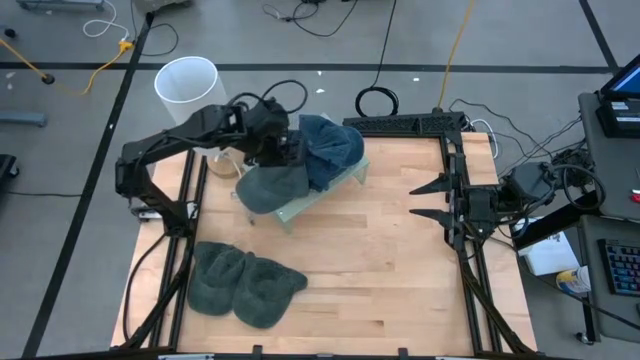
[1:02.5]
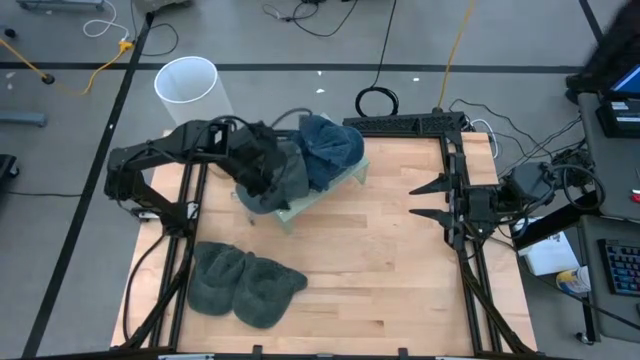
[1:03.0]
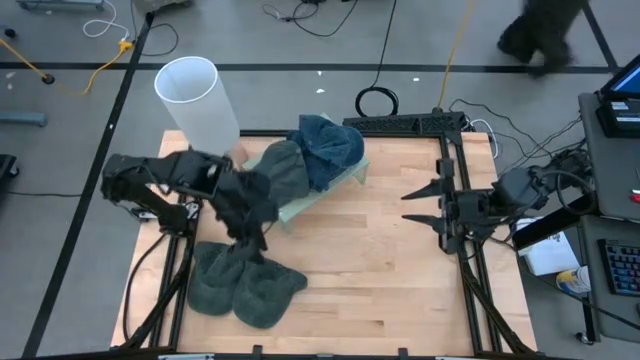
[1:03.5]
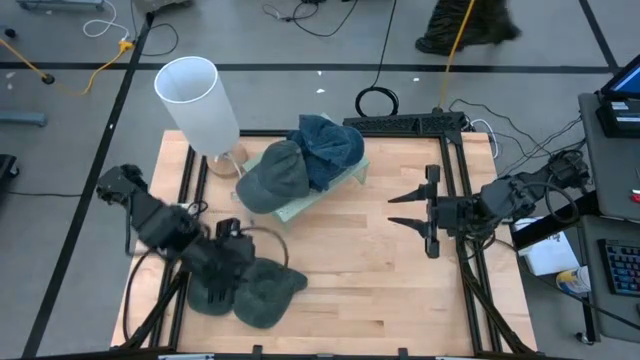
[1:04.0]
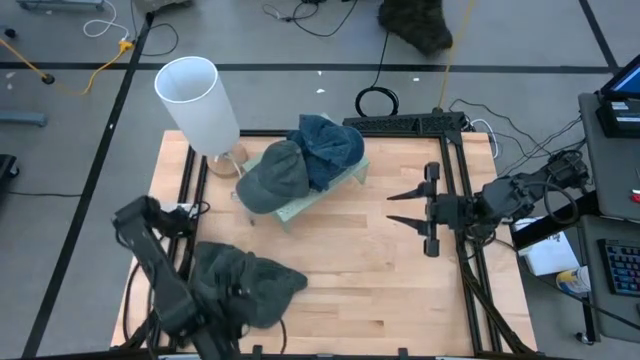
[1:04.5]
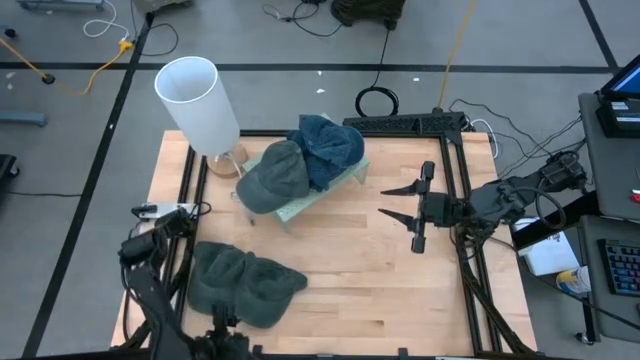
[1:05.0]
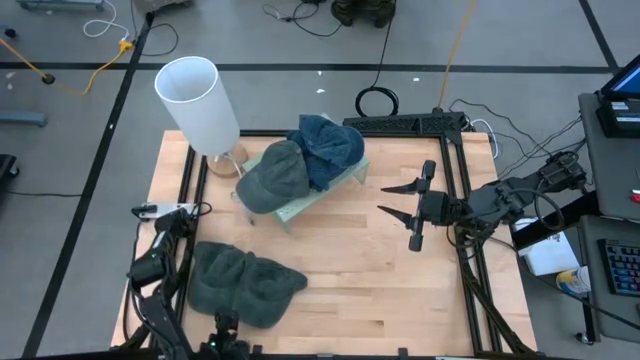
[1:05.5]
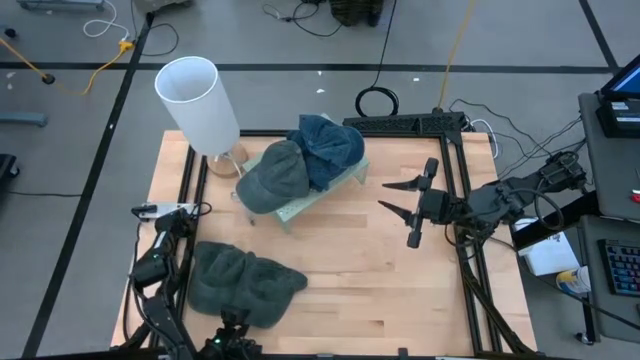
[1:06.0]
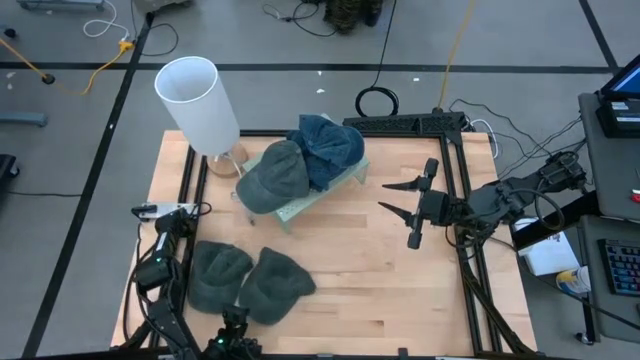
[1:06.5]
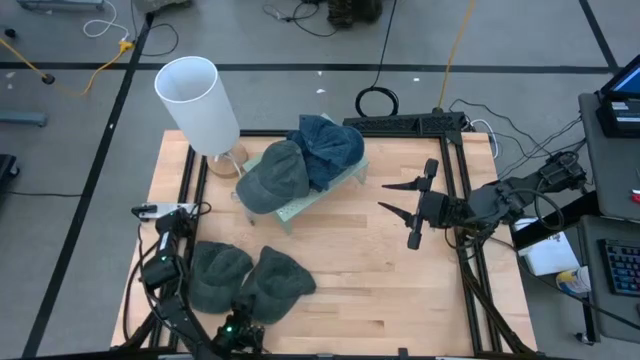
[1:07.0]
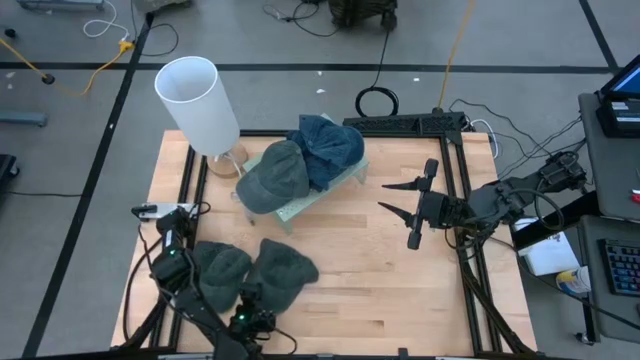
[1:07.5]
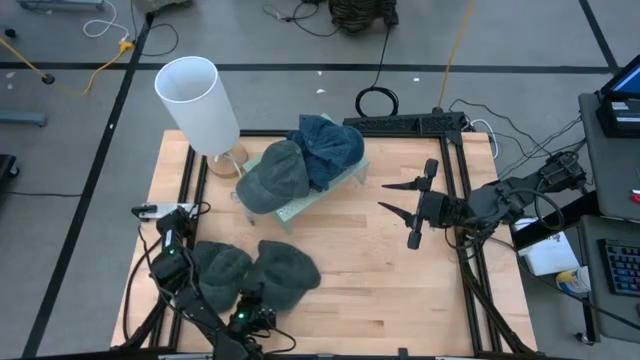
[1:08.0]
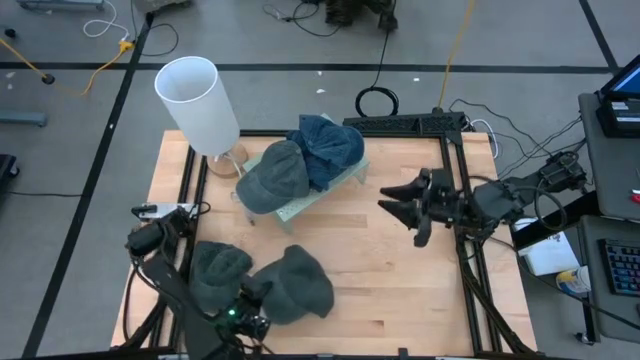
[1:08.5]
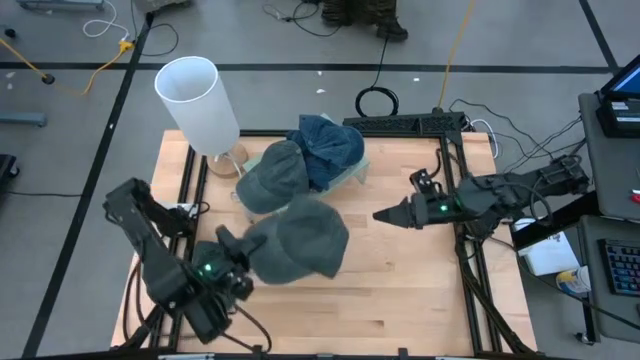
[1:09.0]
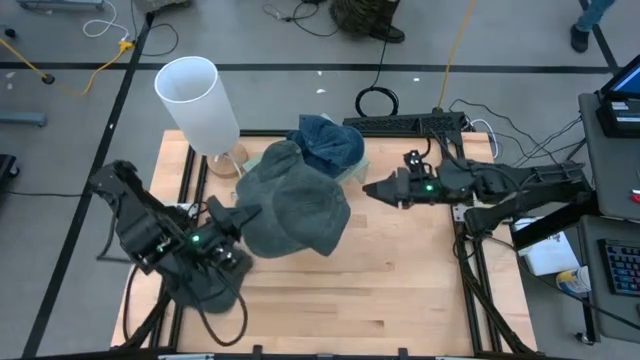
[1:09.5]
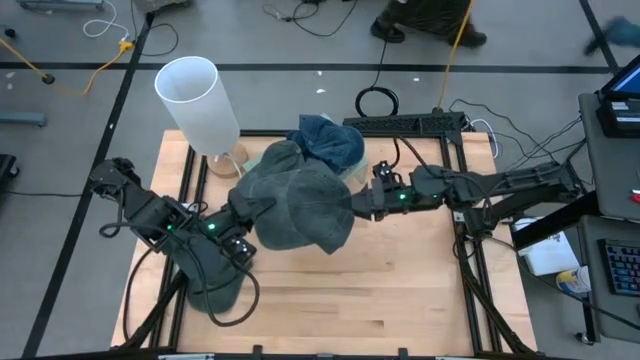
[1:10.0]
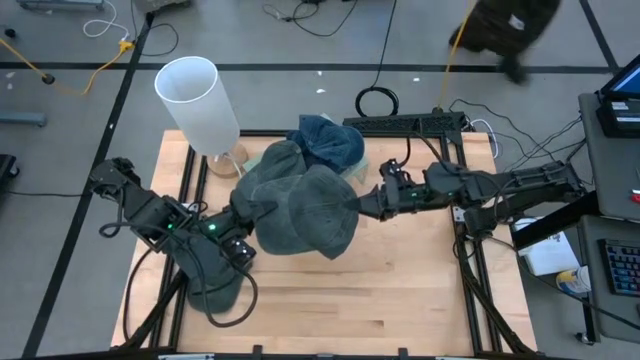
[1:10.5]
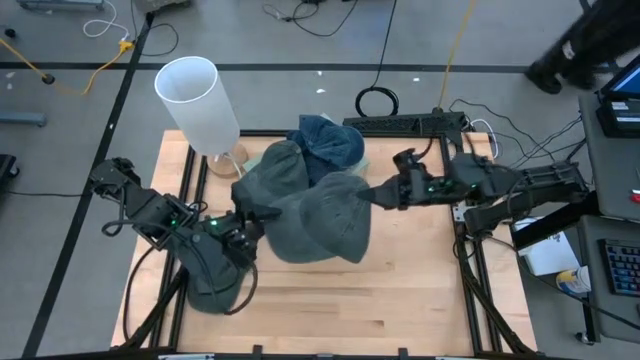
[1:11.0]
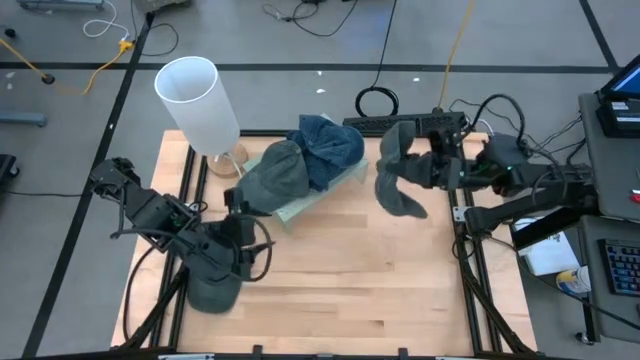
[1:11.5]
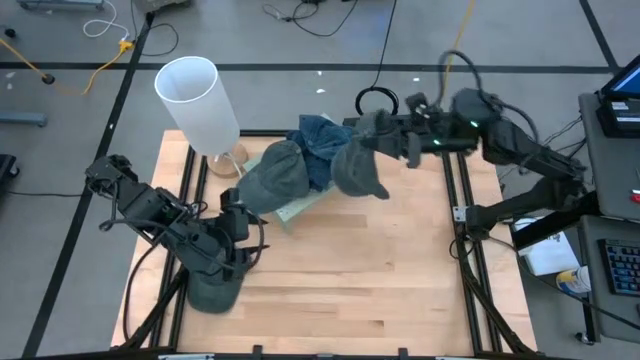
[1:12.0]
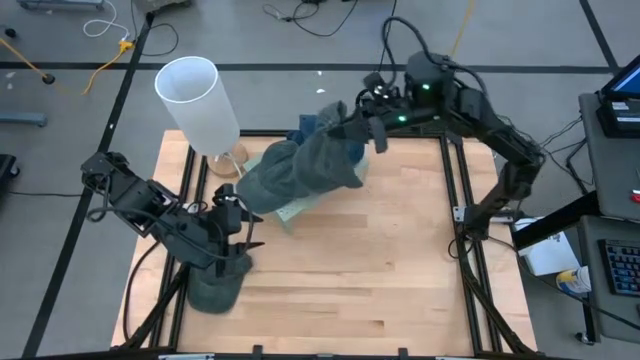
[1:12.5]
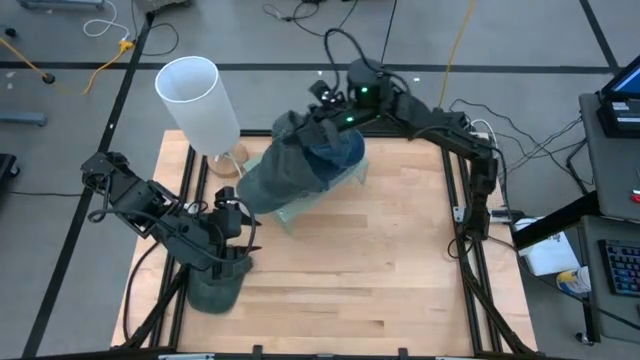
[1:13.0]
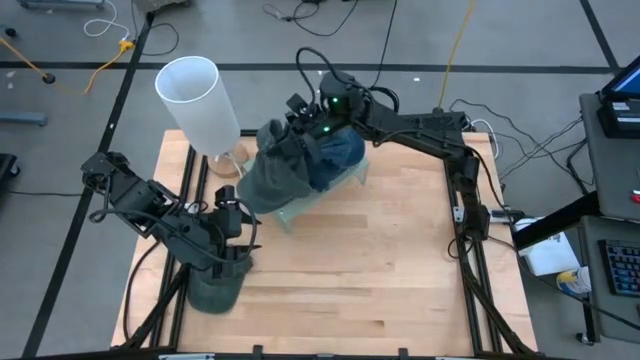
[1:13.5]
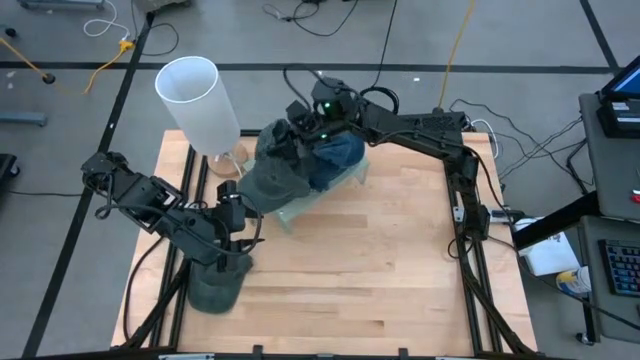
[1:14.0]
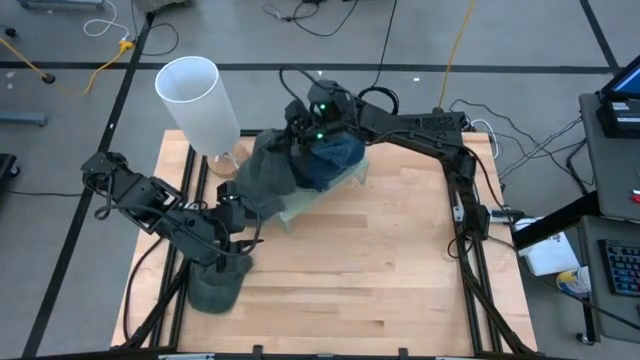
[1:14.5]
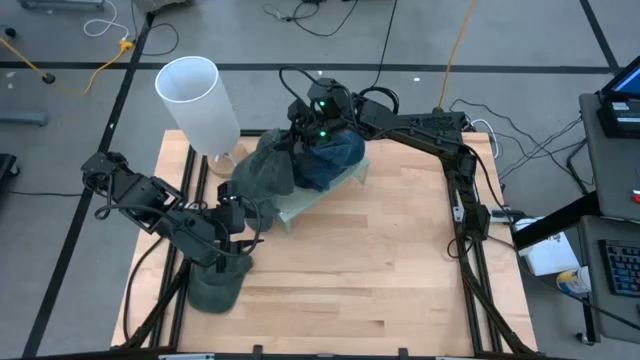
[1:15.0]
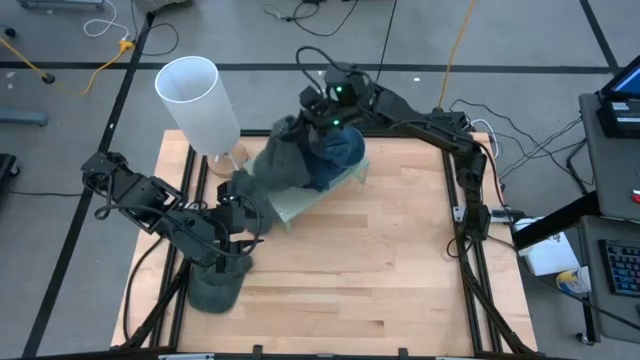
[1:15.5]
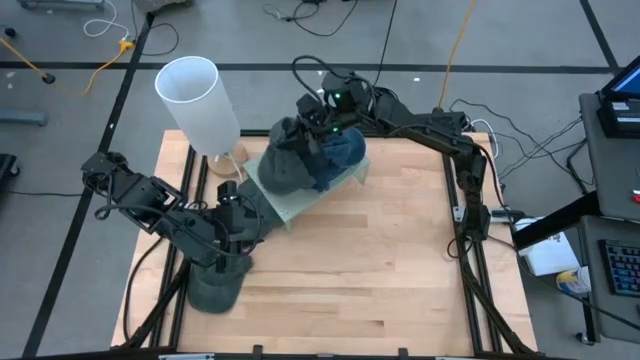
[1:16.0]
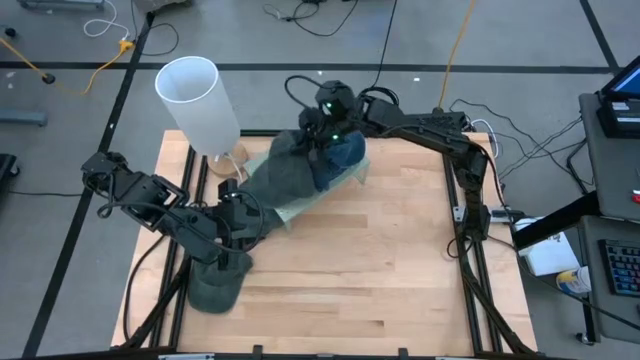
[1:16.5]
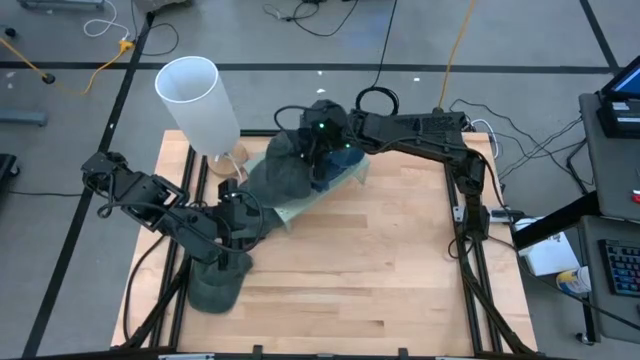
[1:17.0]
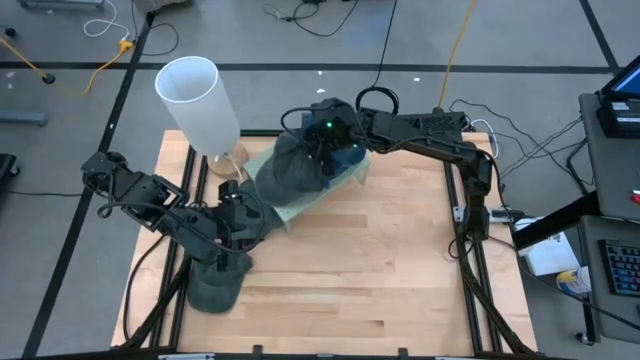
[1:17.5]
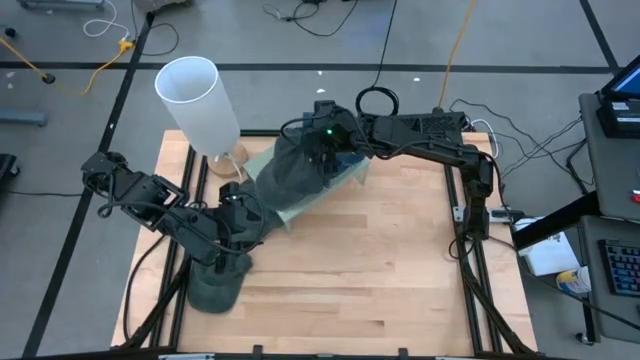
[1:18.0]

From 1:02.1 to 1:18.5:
Task: Pick & Place hat
Stack the right green cap on the other green cap on the shelf

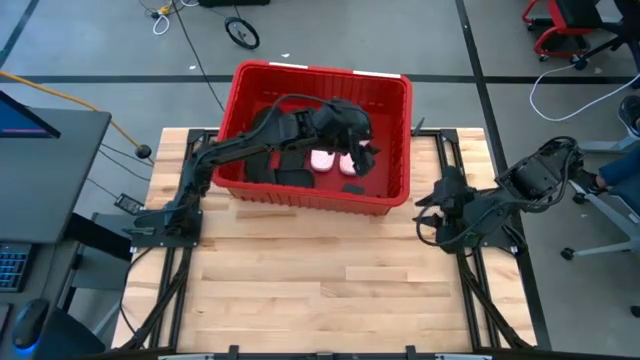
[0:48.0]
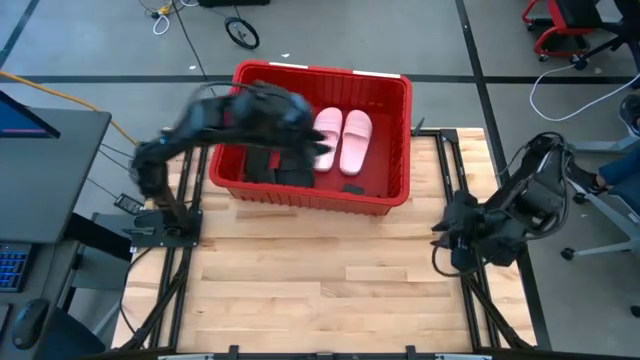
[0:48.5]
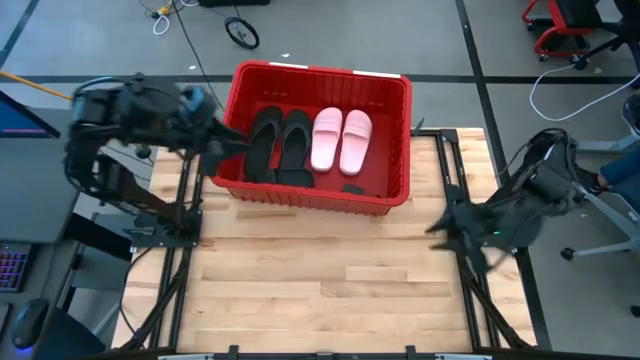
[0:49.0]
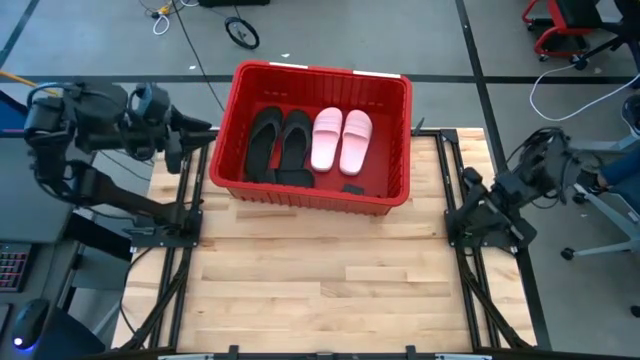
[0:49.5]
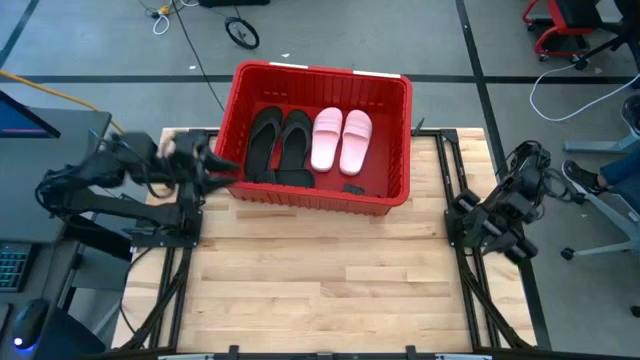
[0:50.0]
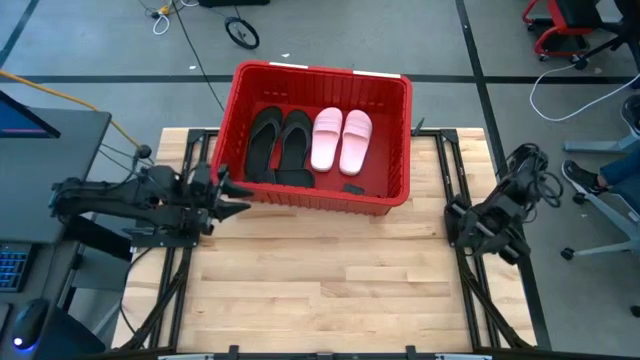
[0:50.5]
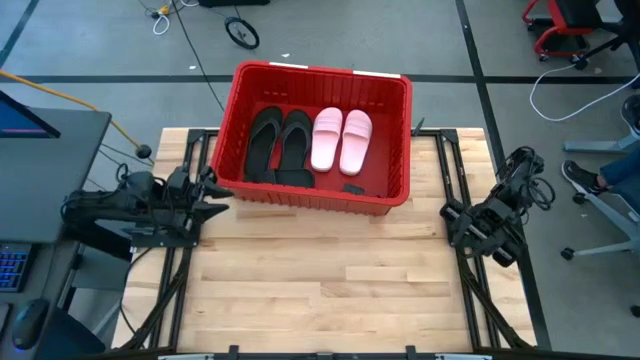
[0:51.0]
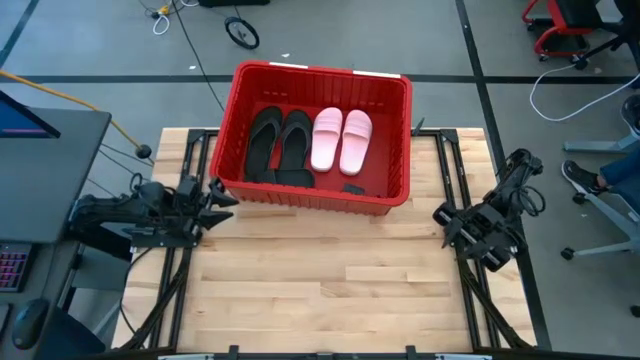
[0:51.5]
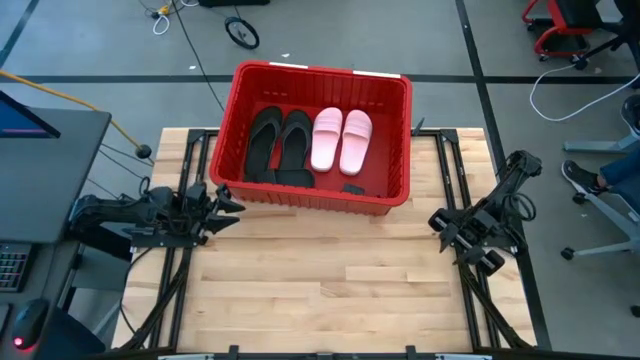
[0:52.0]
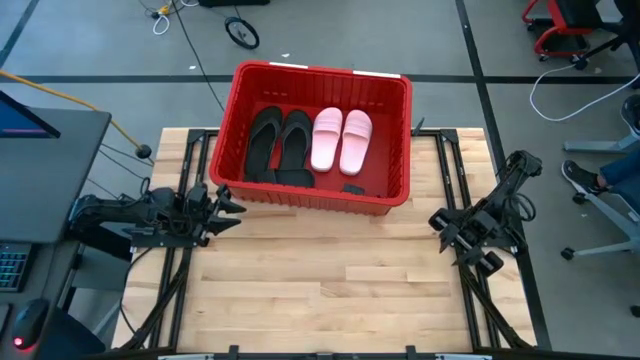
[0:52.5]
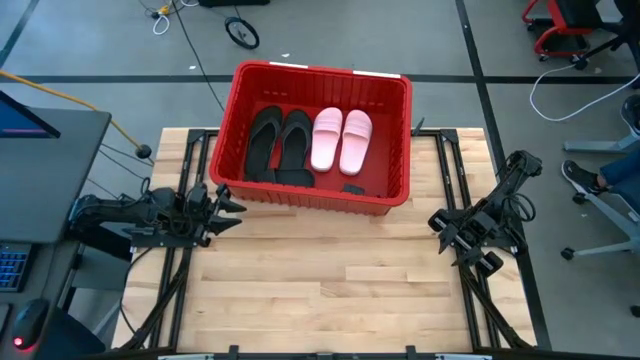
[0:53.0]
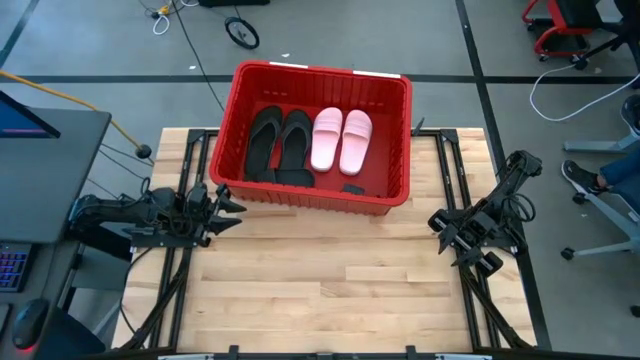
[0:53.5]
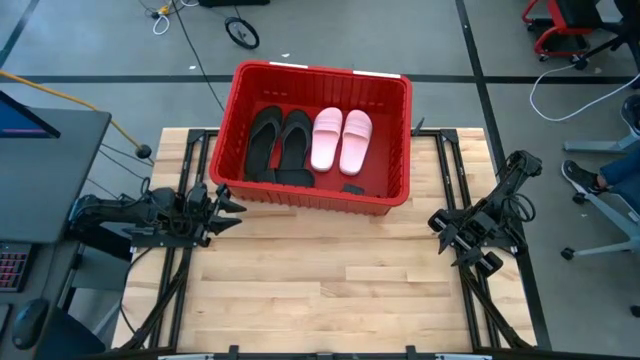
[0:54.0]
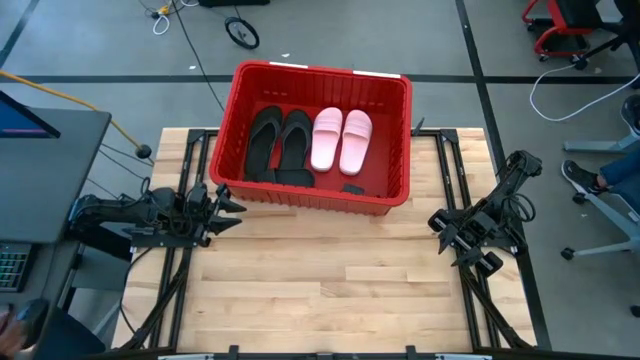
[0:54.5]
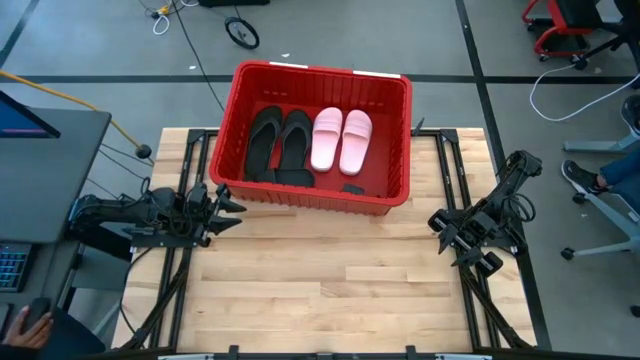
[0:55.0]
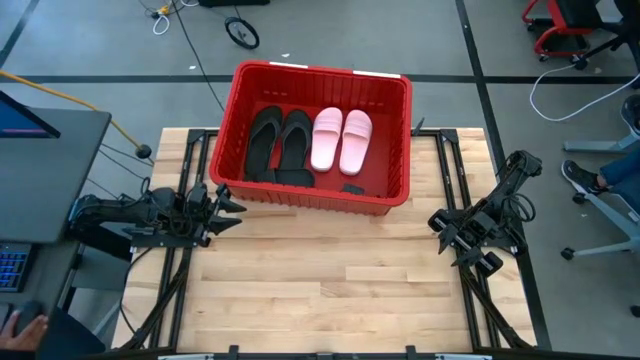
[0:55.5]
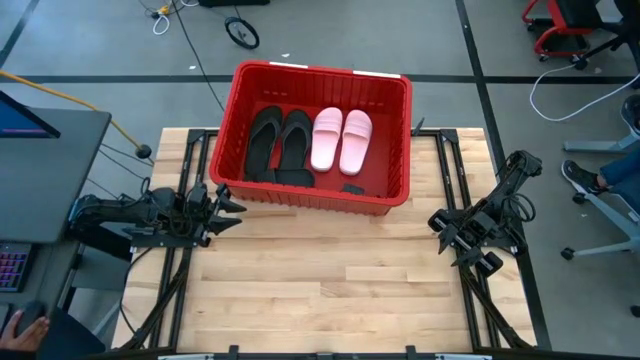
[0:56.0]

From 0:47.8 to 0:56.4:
Task: Pick and place slides into bin
Return to Home Position
